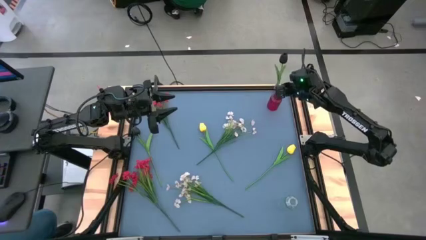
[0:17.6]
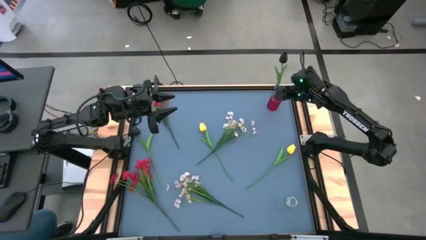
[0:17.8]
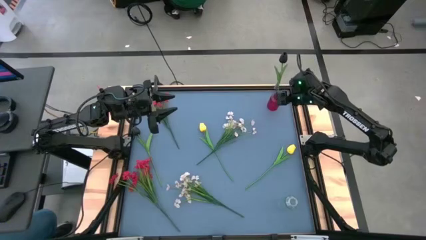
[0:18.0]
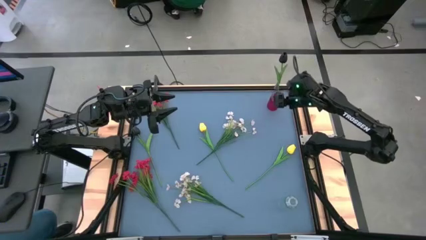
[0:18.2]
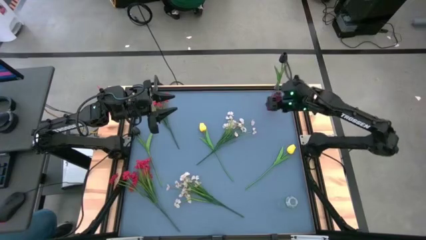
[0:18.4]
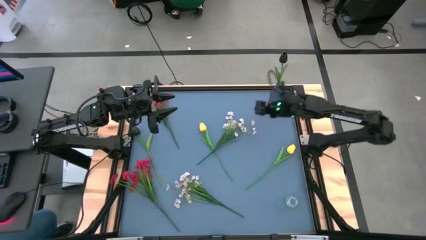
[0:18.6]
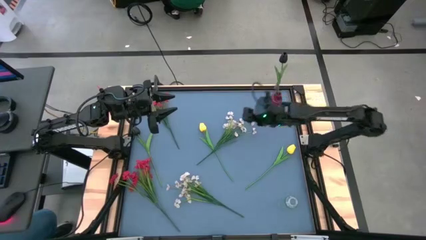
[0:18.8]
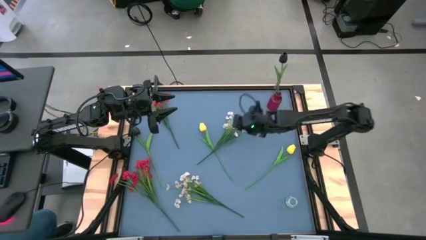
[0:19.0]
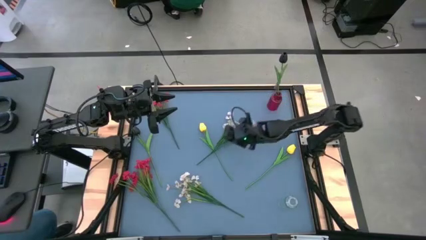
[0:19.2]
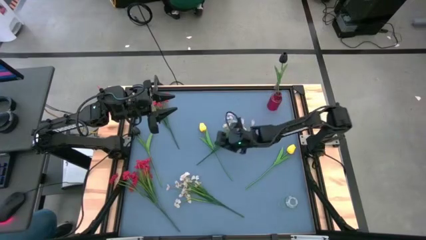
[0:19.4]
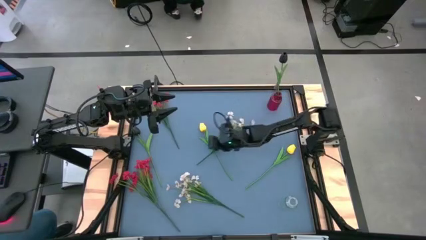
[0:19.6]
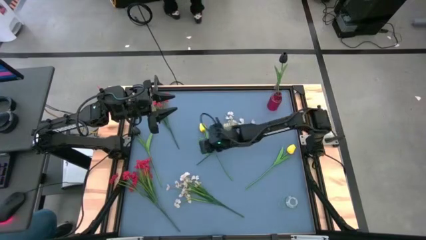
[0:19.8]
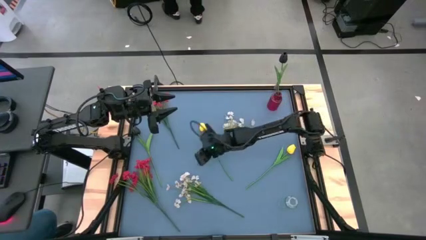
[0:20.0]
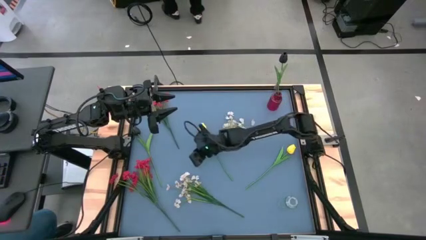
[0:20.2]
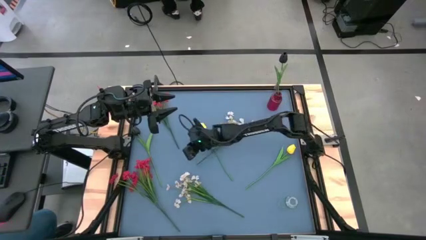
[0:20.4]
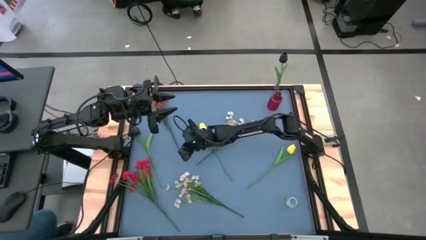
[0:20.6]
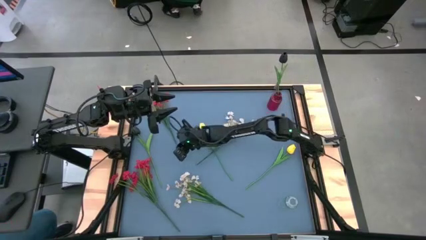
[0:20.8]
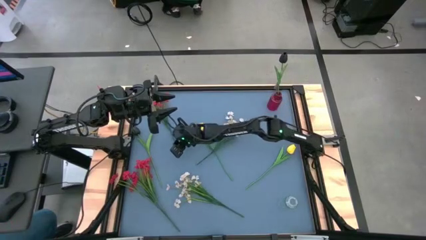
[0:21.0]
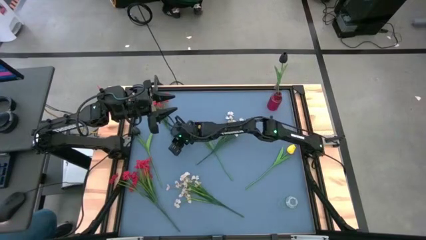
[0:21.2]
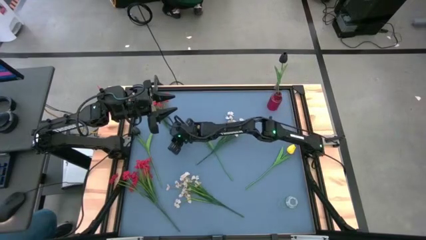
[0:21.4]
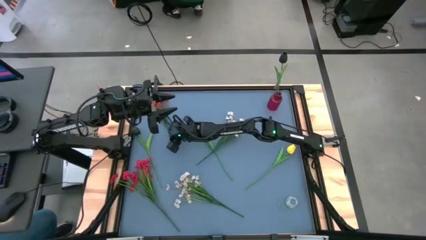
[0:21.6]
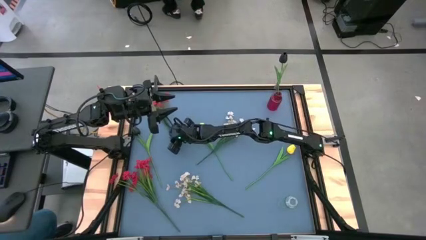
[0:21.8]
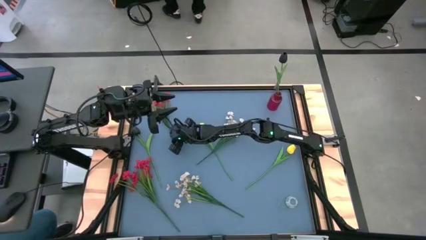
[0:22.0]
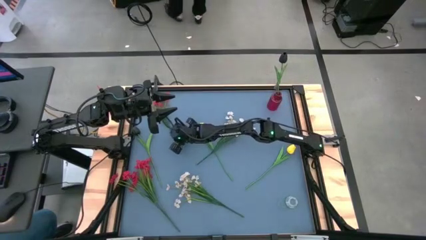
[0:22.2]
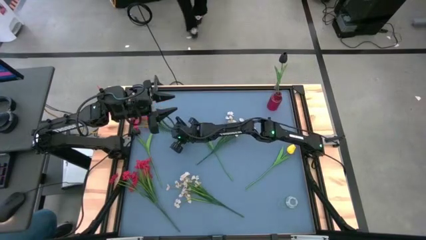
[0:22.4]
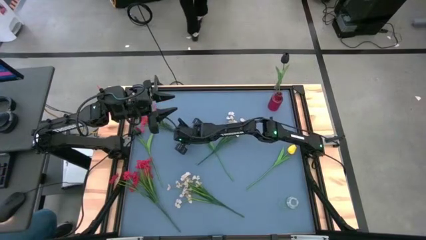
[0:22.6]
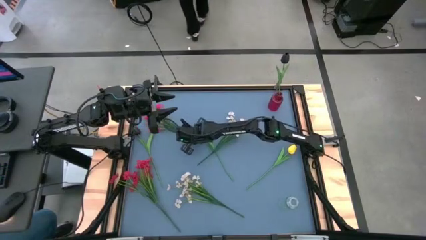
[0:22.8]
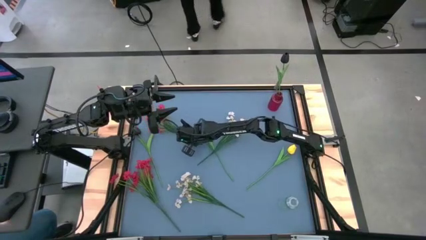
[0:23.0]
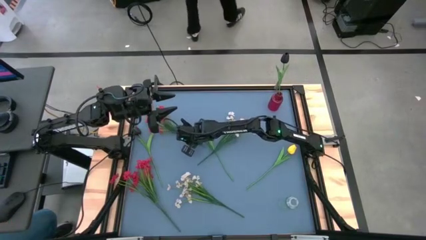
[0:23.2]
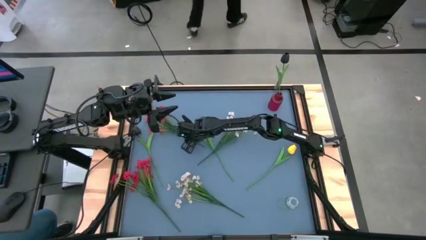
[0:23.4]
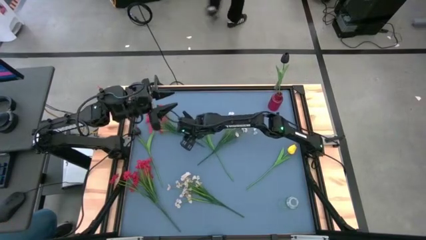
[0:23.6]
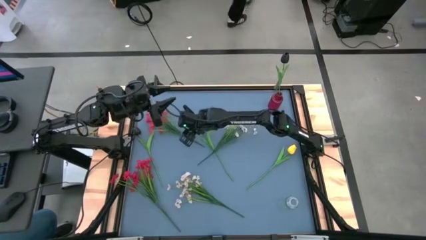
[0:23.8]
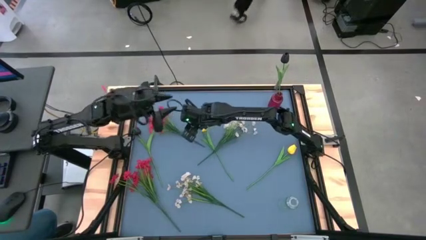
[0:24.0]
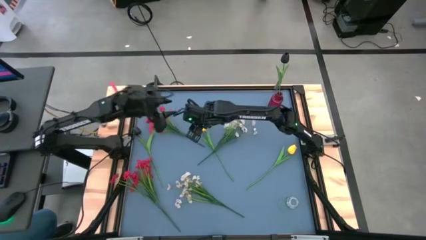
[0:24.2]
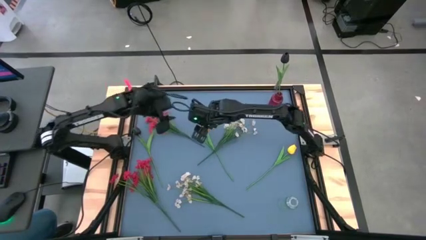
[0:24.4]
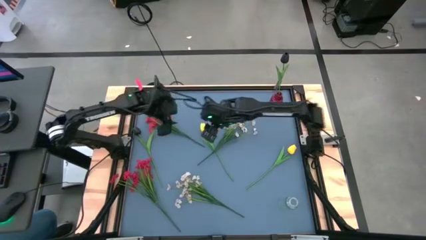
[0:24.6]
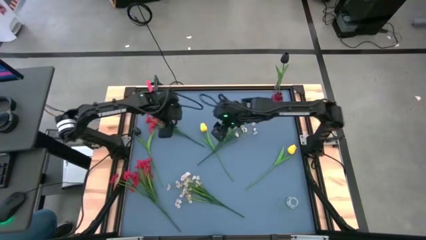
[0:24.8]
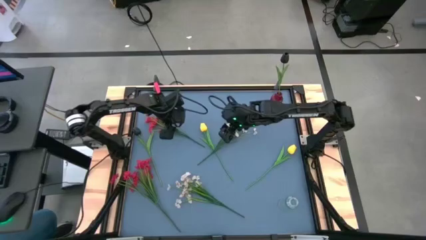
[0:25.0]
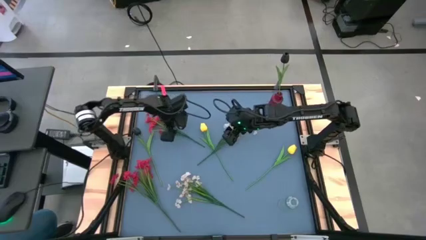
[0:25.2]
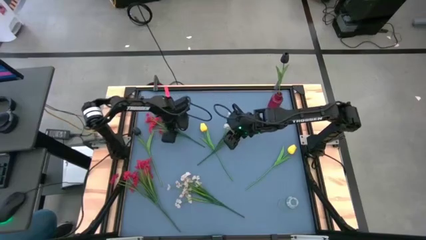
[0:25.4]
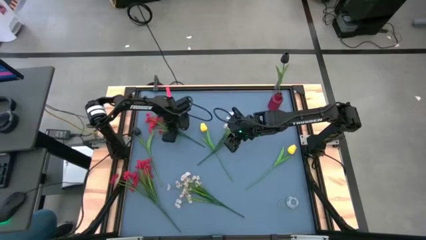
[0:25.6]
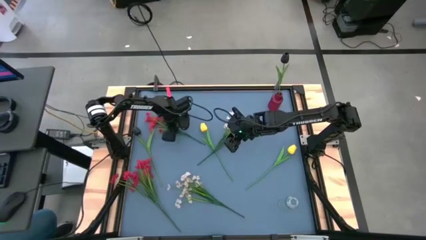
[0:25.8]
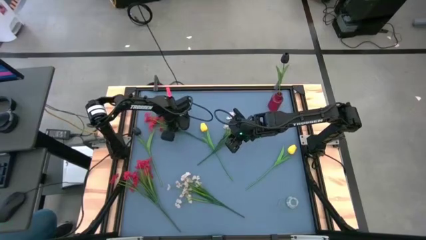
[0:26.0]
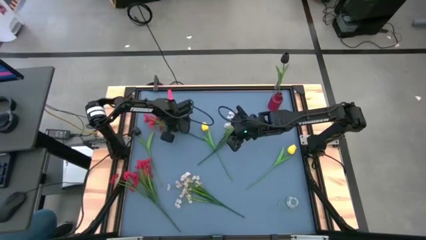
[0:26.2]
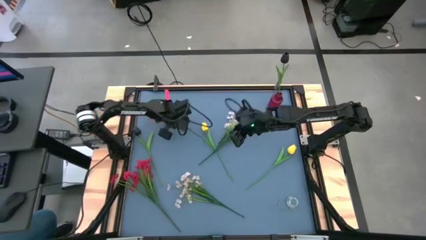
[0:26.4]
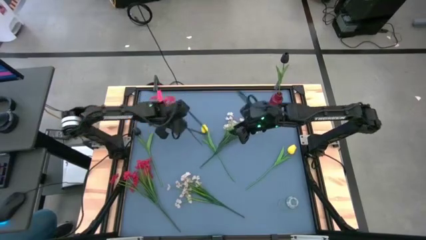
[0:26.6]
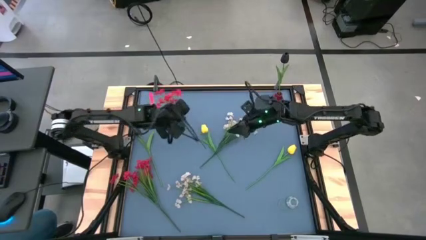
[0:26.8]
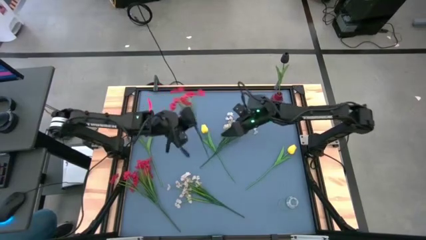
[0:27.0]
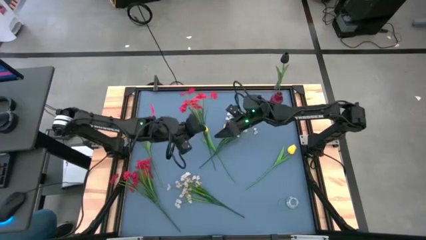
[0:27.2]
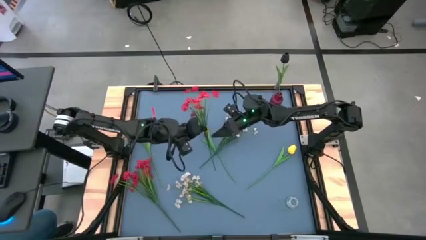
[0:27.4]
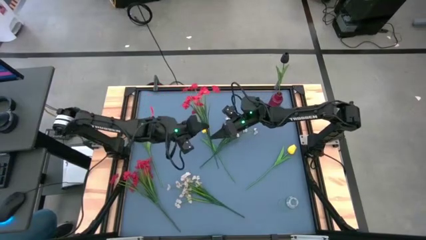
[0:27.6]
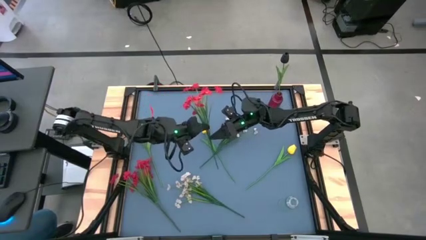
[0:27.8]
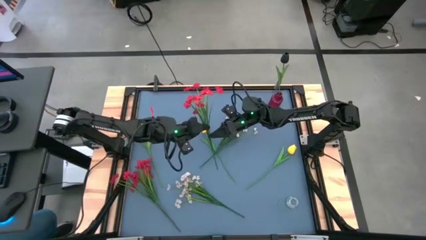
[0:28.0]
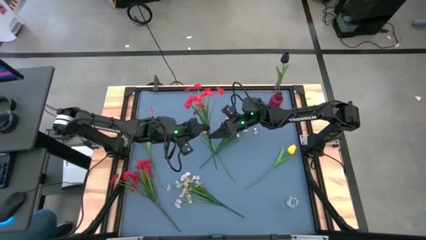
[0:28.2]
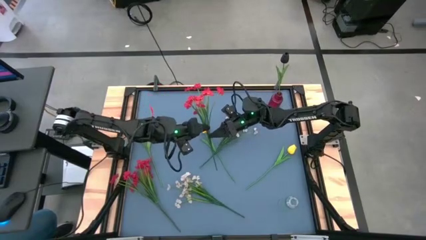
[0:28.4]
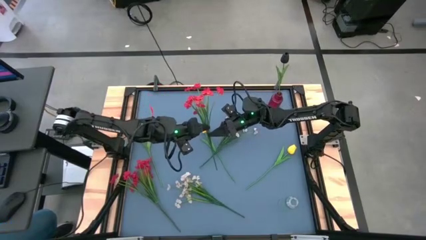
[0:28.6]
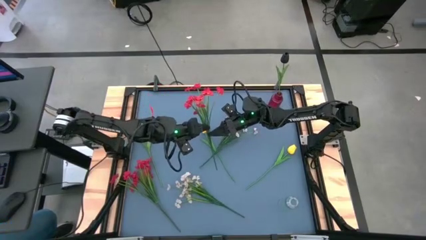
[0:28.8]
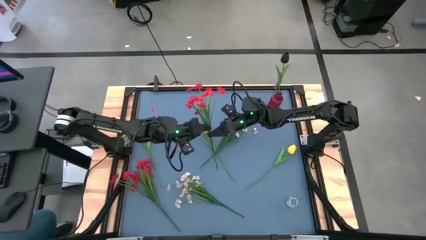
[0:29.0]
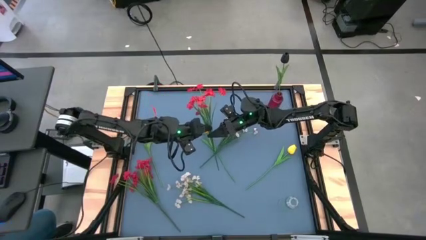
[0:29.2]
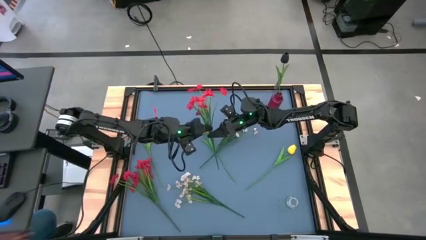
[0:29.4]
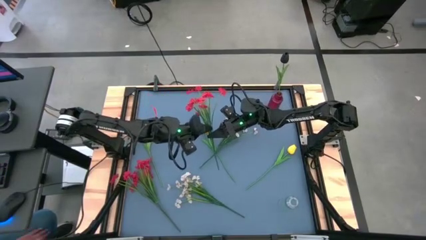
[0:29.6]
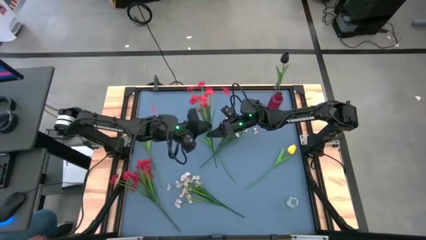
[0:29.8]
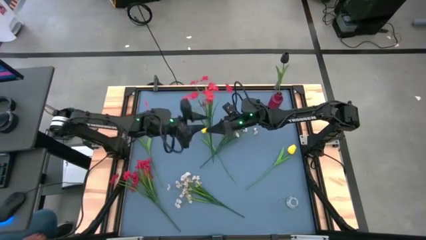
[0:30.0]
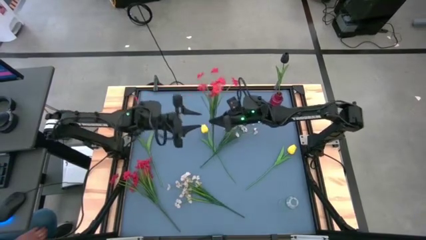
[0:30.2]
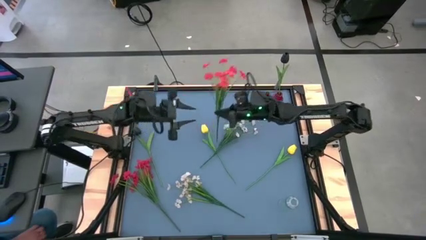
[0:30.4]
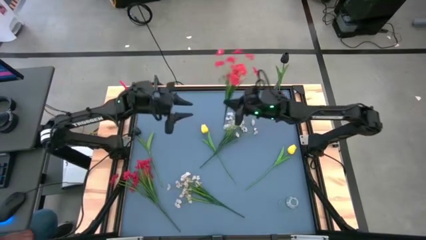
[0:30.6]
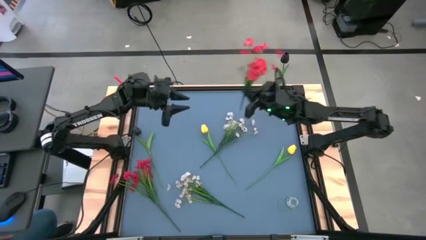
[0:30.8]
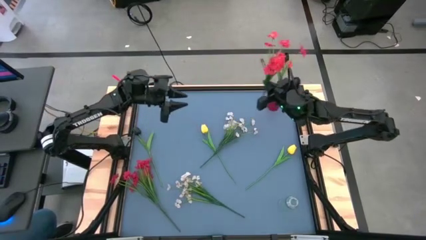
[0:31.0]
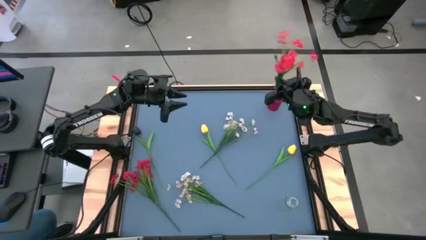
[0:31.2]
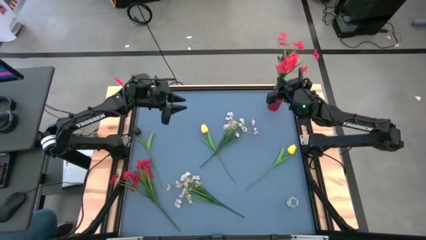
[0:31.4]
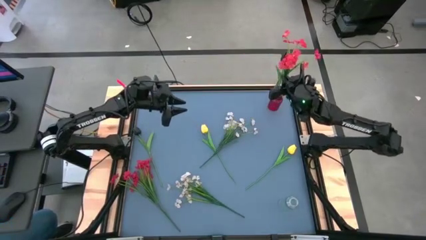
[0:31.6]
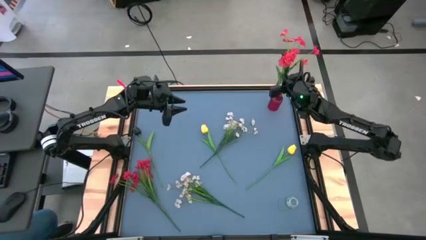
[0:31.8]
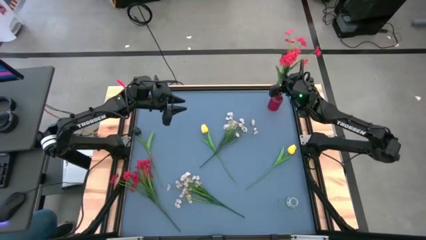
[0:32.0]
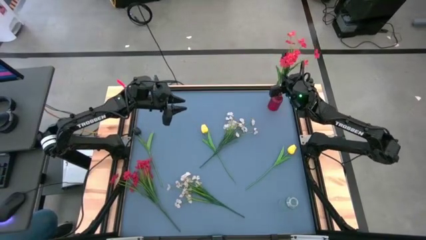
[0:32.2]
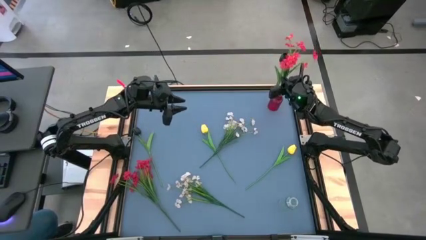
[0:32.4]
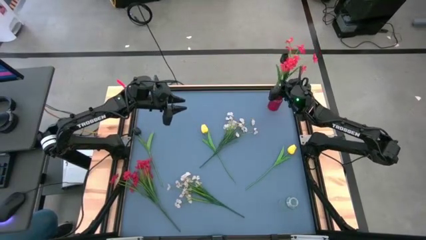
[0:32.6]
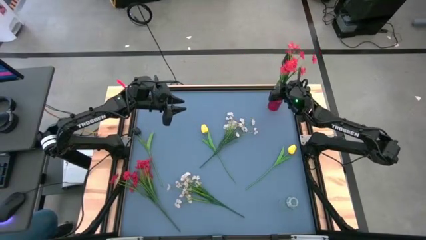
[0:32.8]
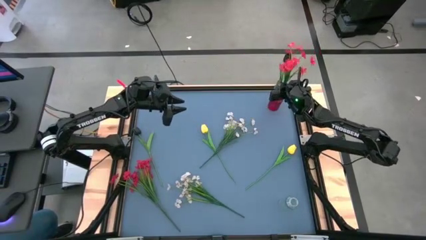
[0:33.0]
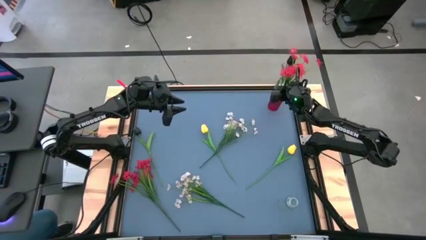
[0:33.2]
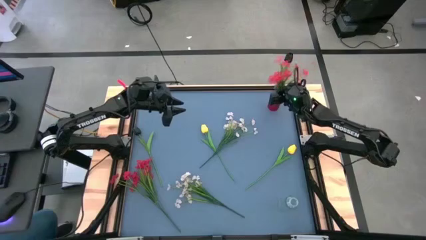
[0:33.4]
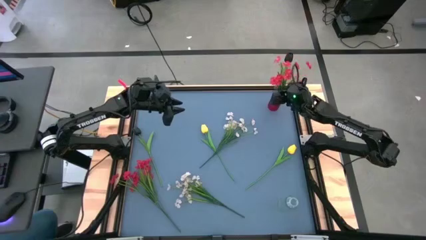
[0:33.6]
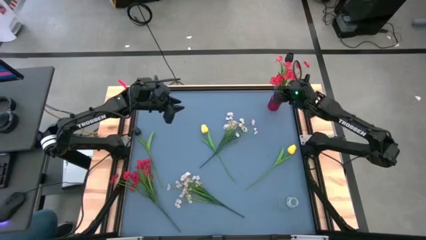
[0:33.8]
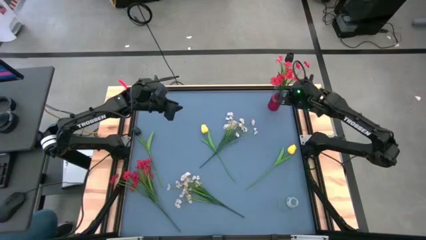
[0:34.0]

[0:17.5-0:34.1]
Task: Sort flowers into vase by color
Put the top red flowers into the red glass vase
